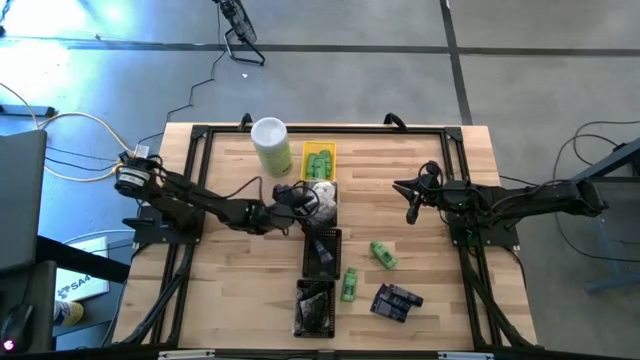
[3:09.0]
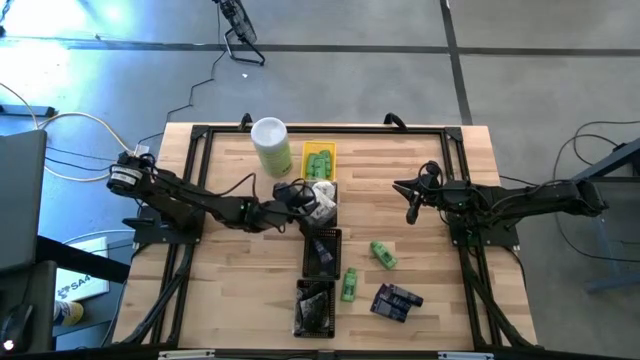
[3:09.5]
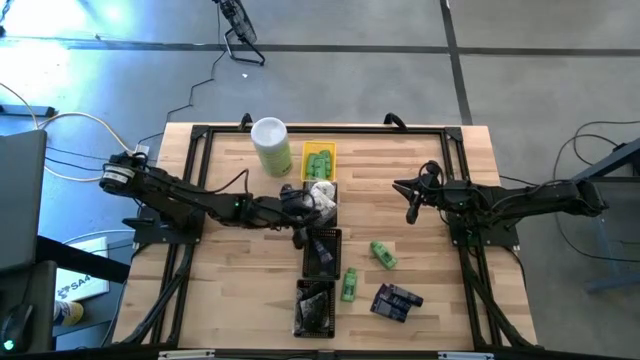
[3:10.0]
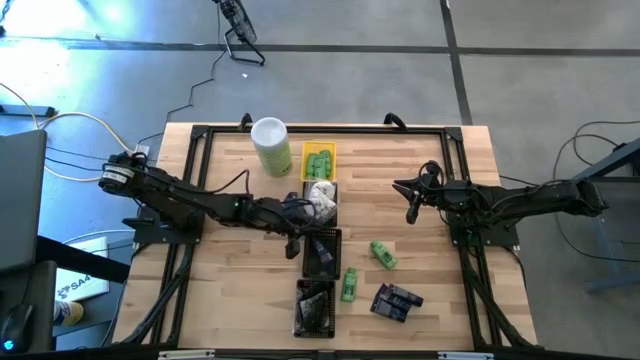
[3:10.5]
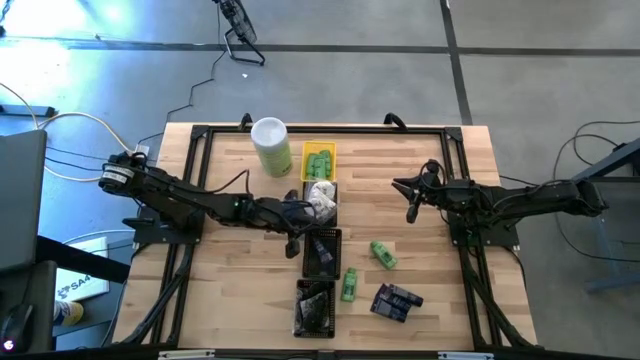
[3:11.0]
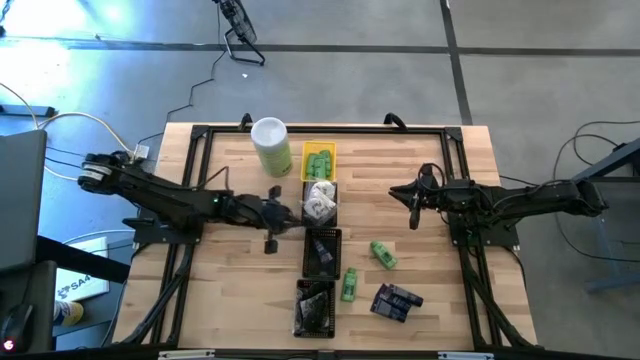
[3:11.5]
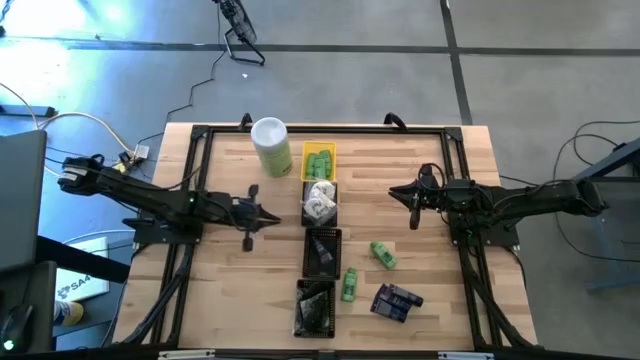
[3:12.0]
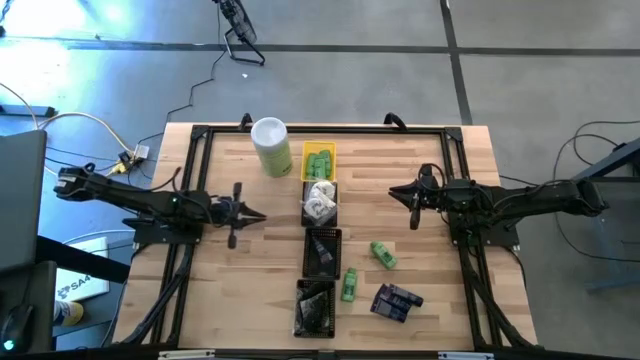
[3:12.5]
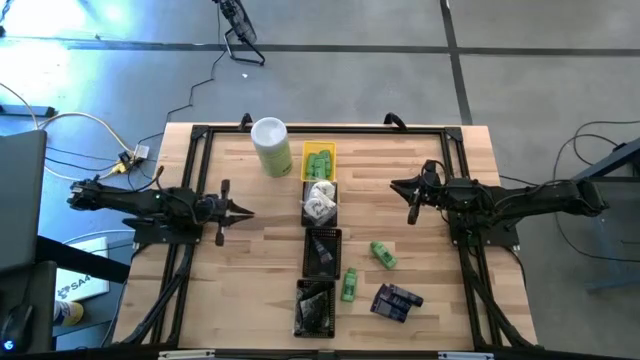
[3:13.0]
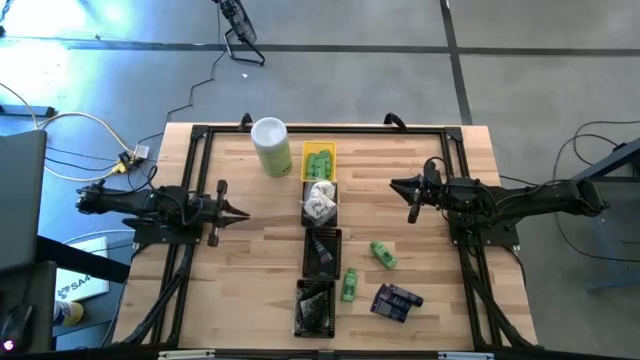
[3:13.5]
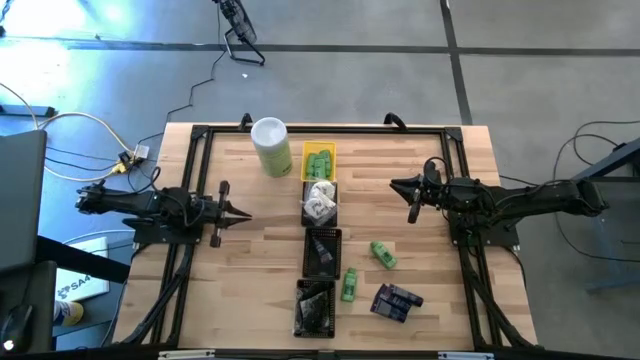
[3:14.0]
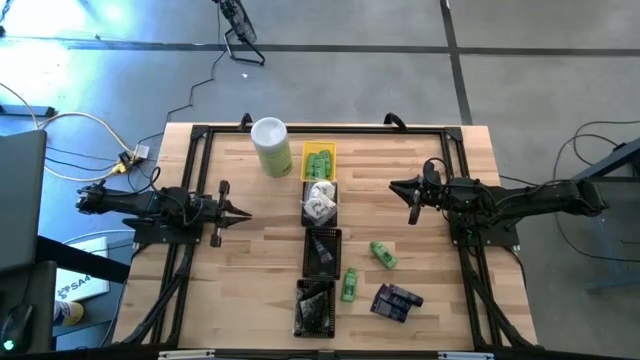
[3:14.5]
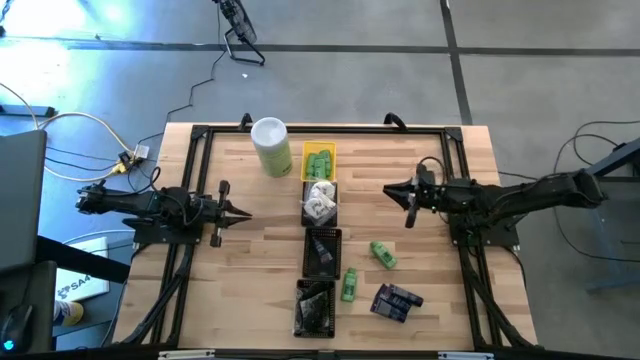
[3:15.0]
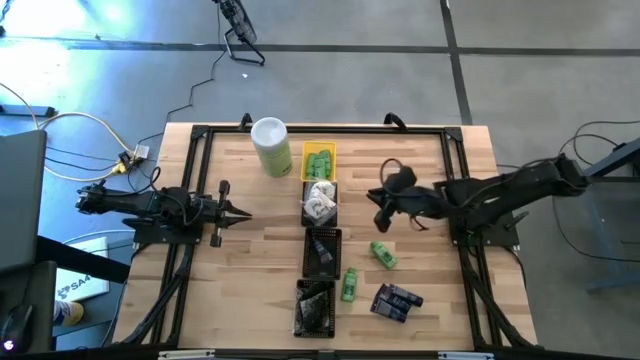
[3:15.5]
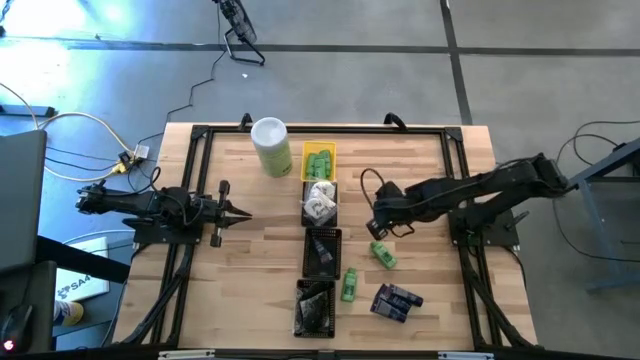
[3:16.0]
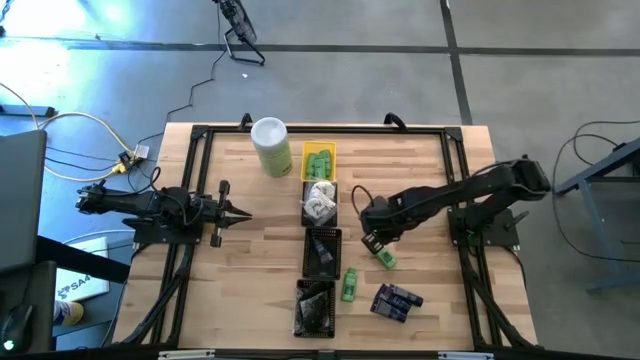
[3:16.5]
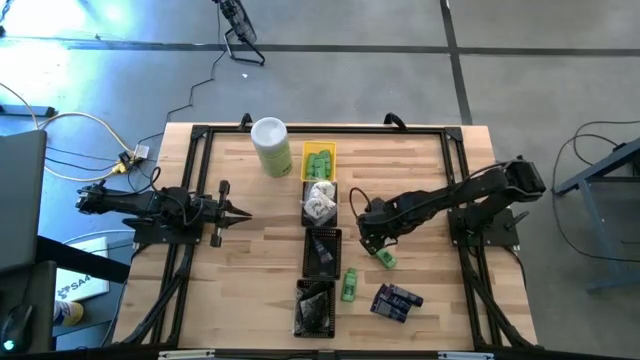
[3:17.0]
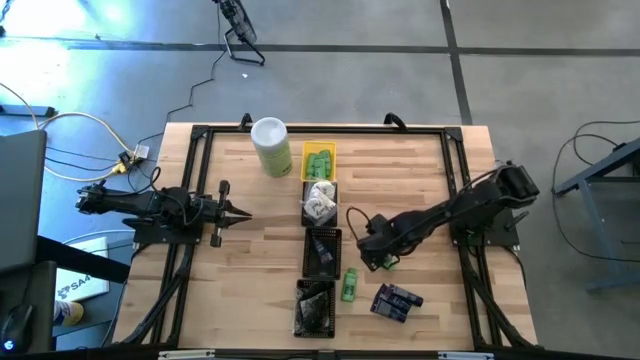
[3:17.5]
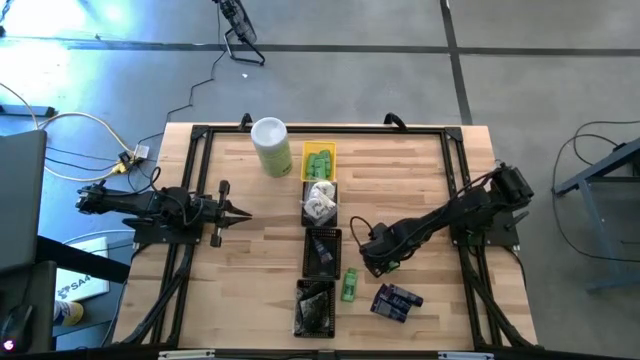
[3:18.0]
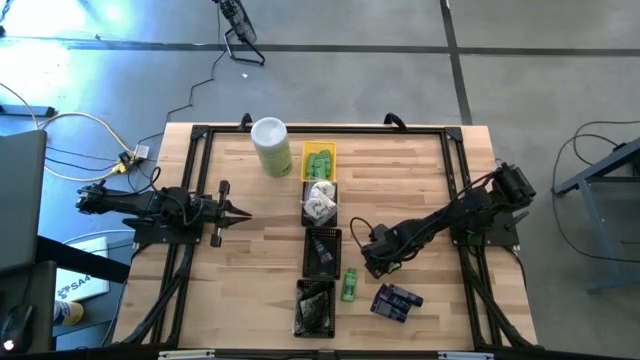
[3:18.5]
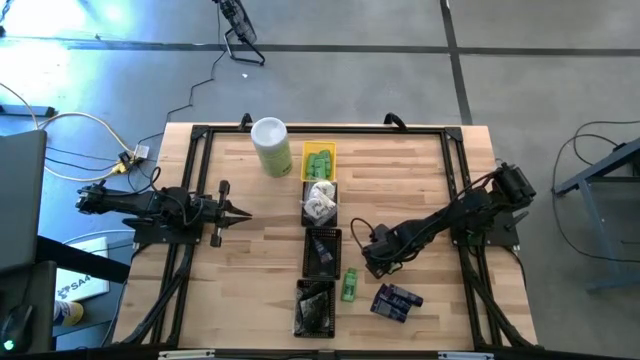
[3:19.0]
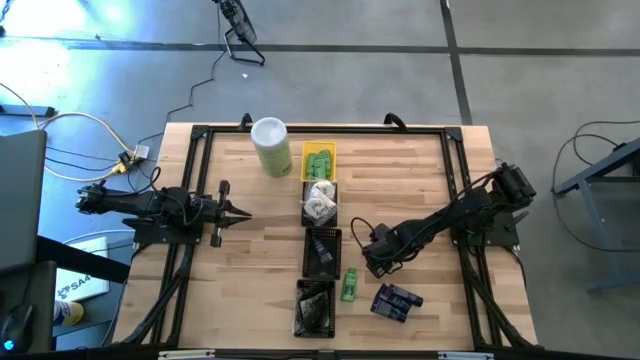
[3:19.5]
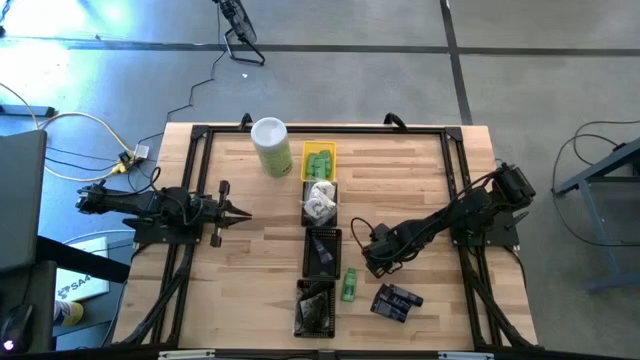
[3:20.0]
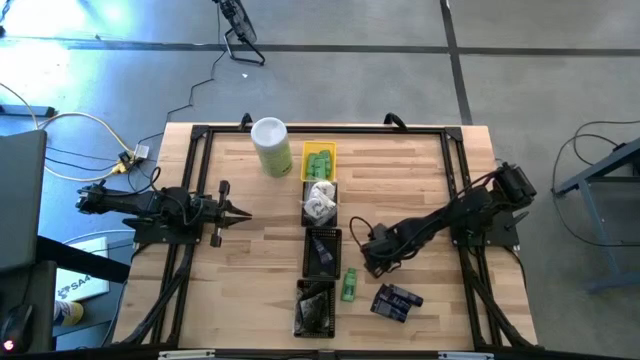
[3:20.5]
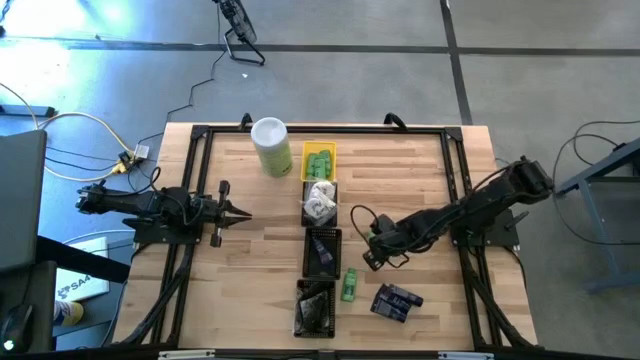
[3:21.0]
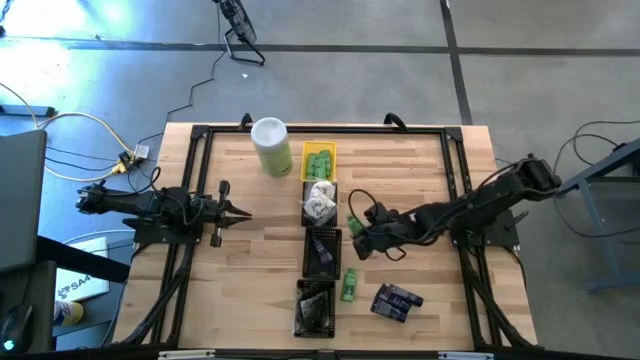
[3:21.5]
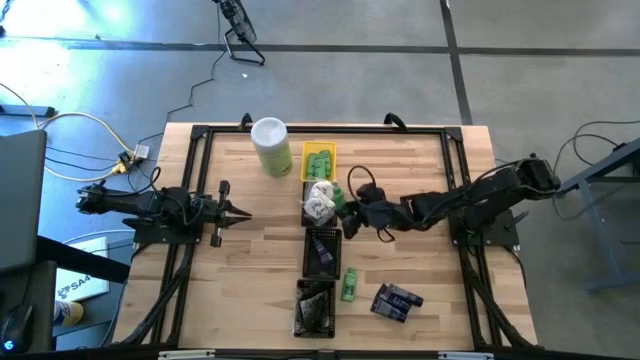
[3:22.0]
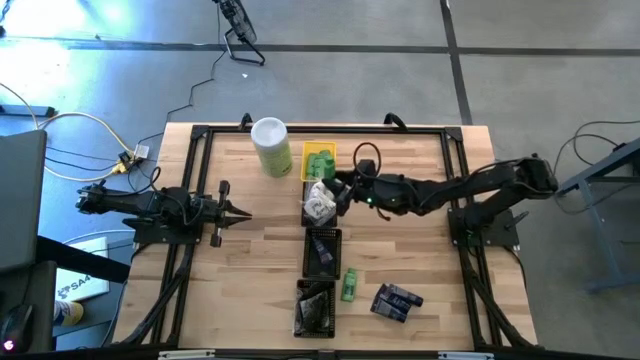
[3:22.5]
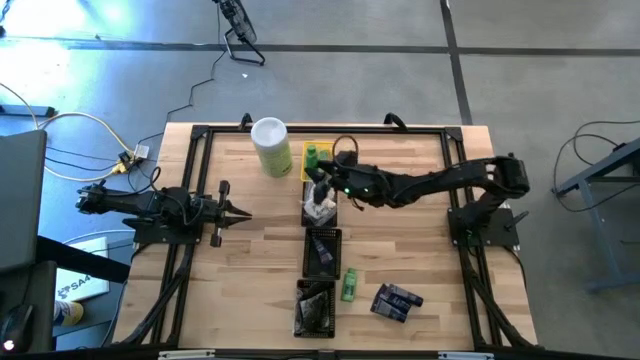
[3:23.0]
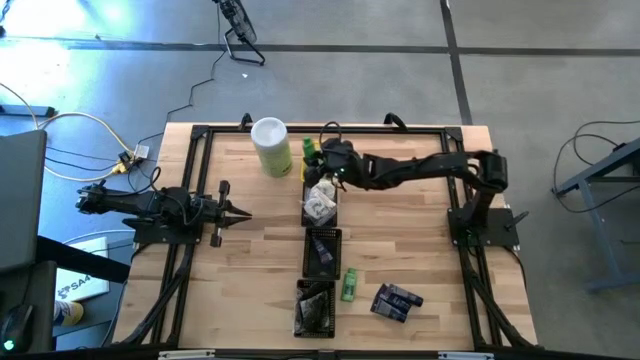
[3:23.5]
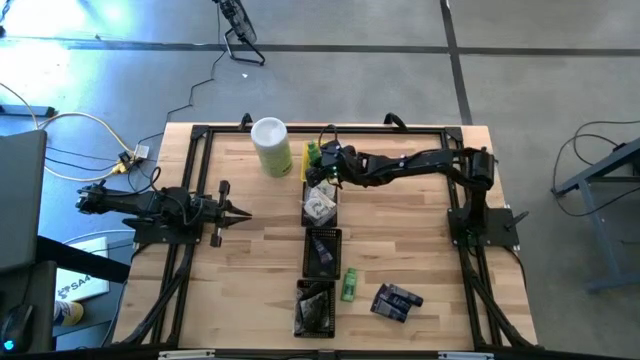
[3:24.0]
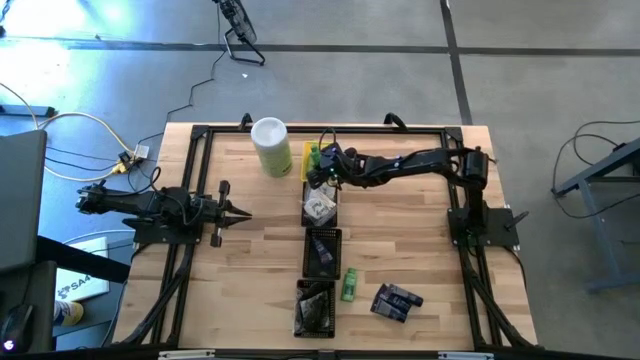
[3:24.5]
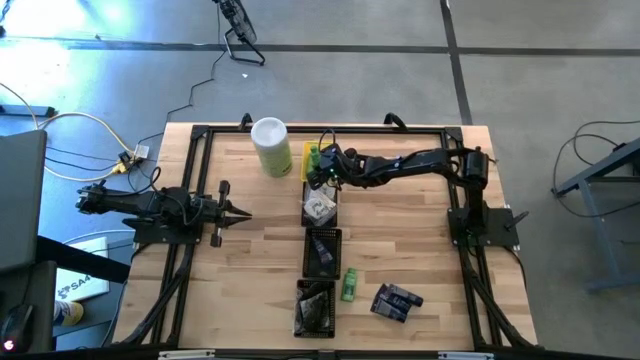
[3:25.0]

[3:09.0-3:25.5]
Task: Pick & Place Travel size toiletries
Put the green bottle into the yellow basket

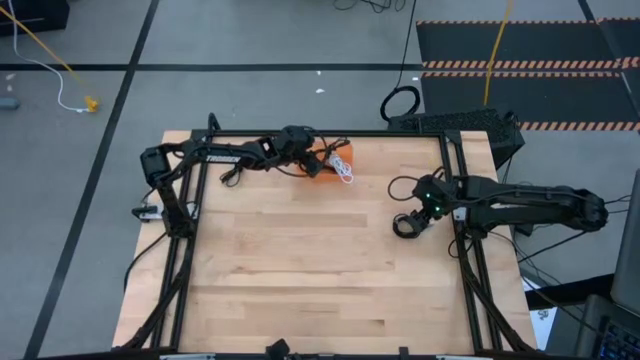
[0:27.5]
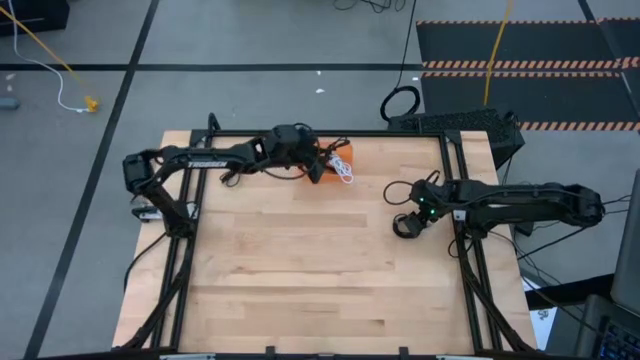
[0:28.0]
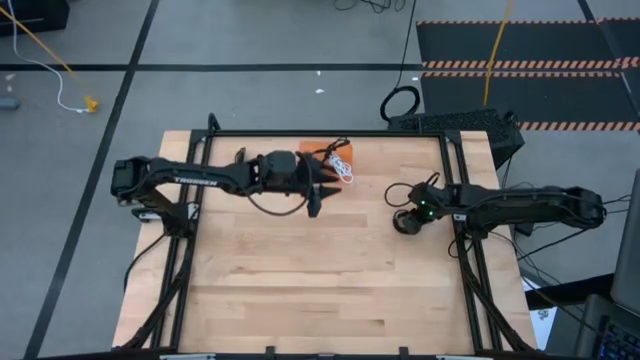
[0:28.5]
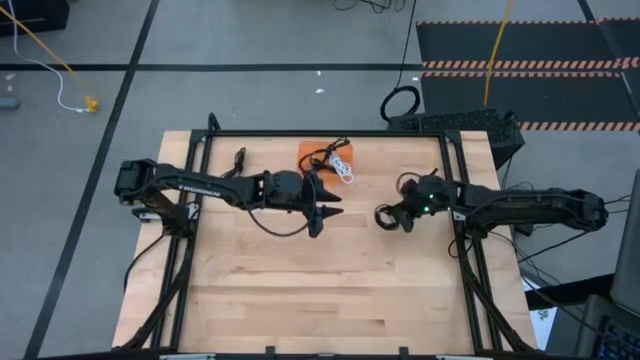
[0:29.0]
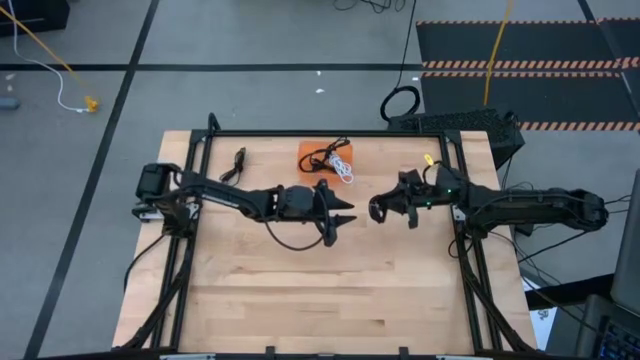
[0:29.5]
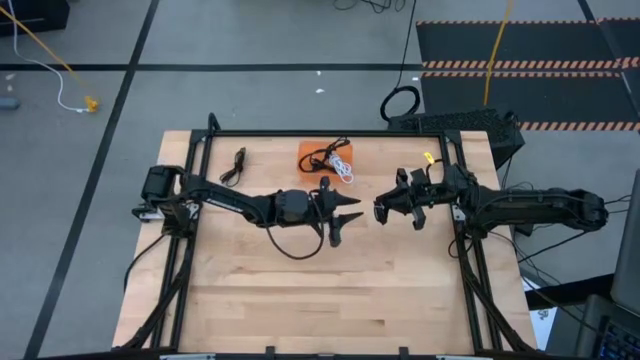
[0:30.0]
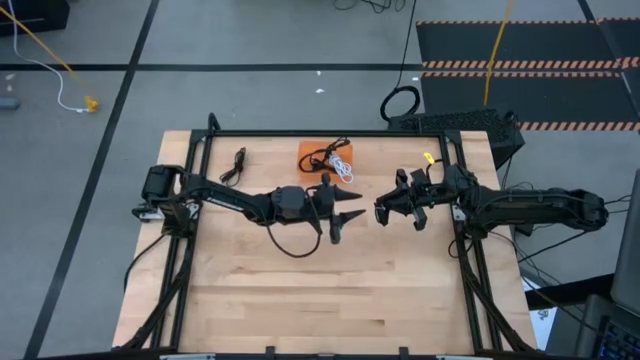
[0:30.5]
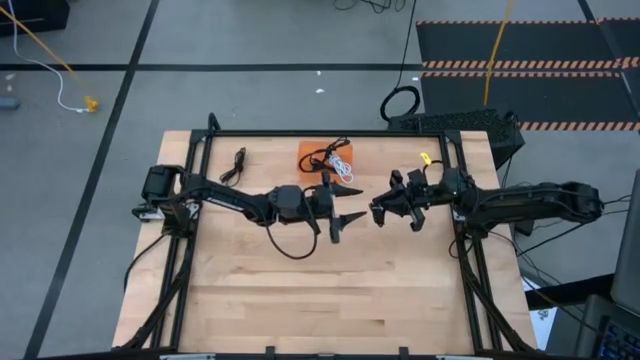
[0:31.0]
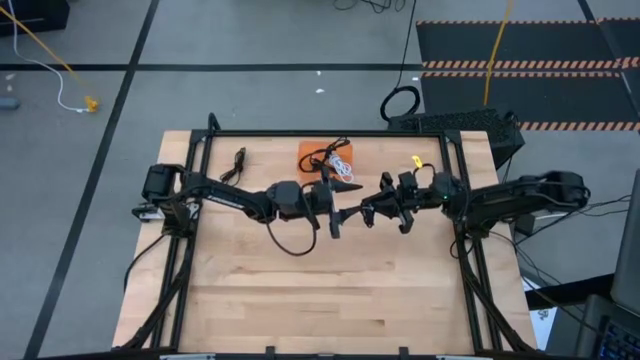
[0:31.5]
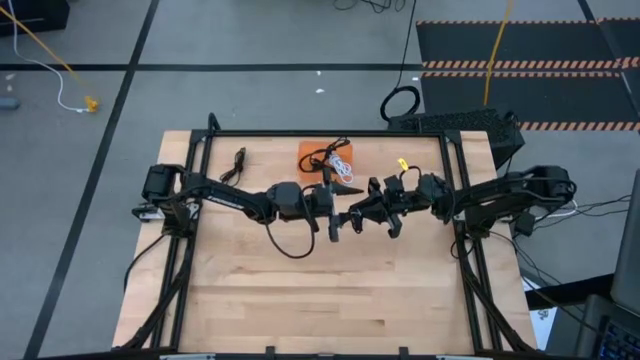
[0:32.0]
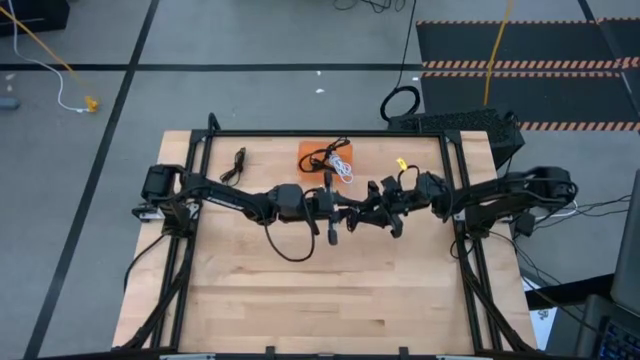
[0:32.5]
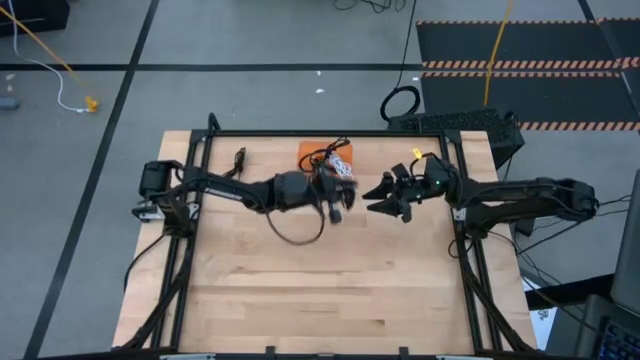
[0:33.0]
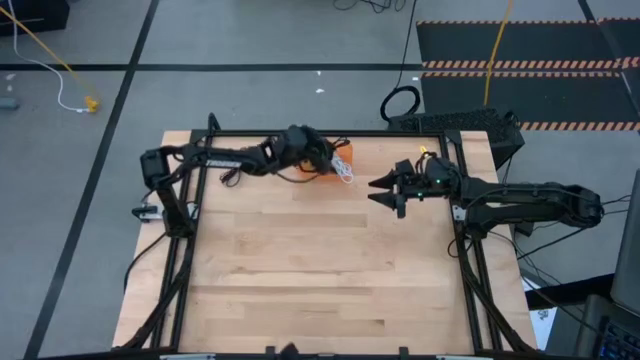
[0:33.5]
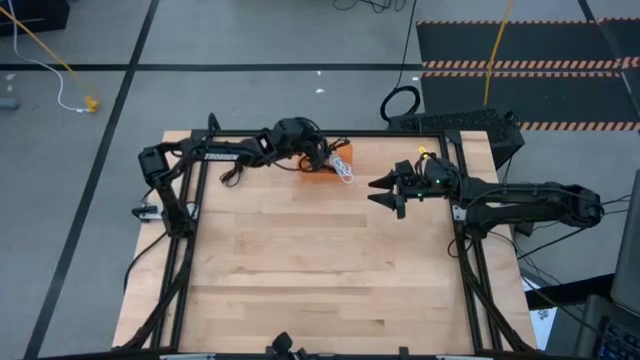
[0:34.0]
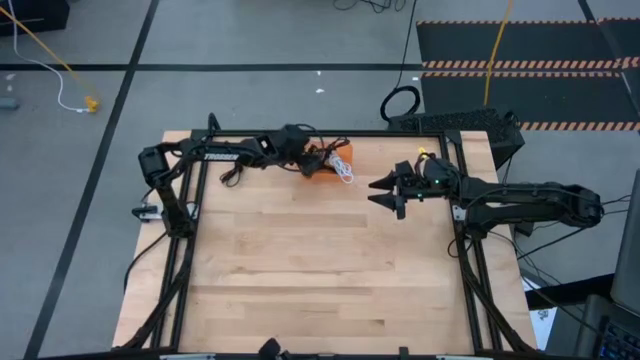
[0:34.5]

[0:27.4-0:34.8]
Task: Pick and place USB-C Cables
Put the black charger cable into the orange bin
